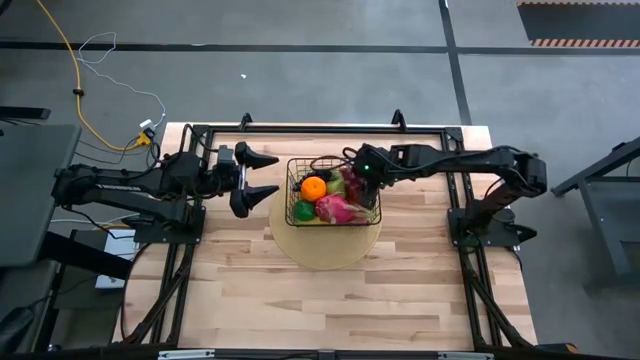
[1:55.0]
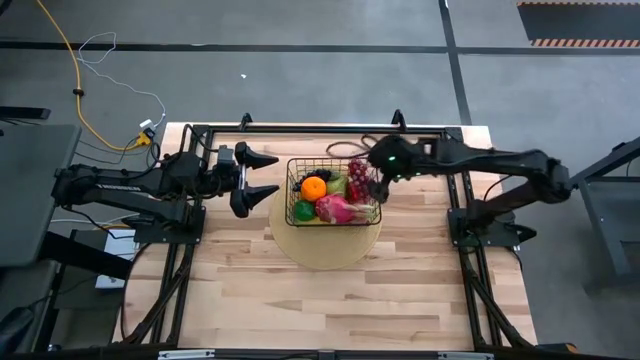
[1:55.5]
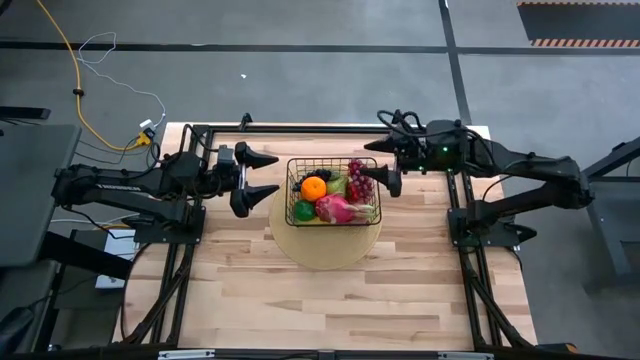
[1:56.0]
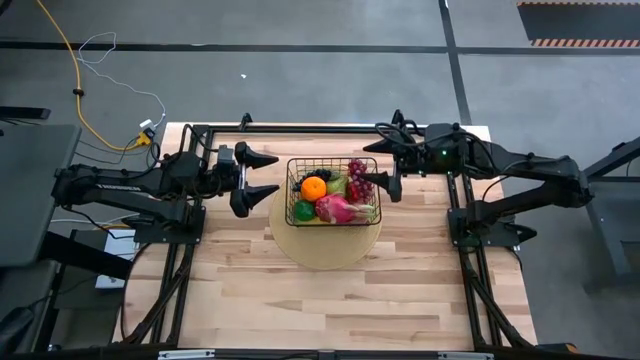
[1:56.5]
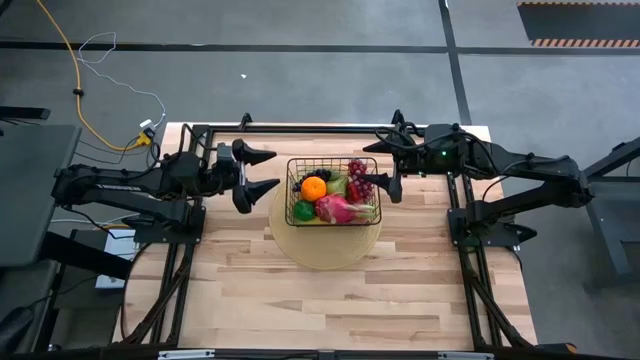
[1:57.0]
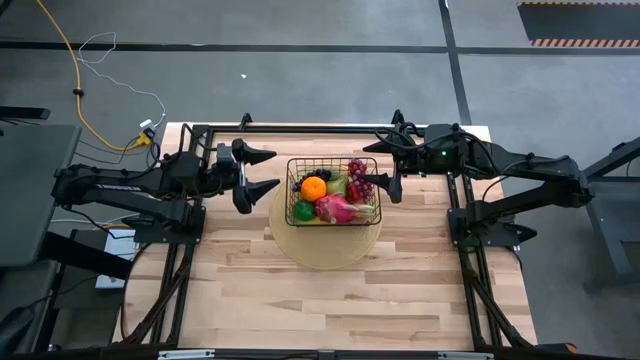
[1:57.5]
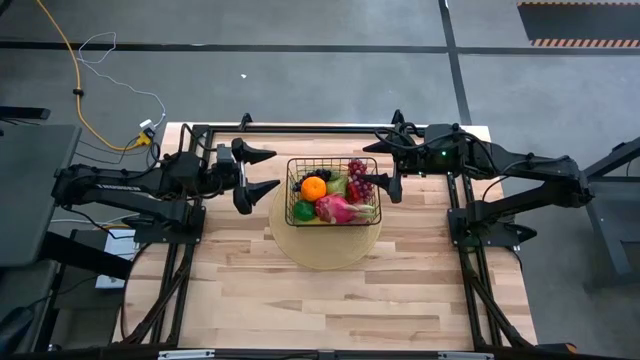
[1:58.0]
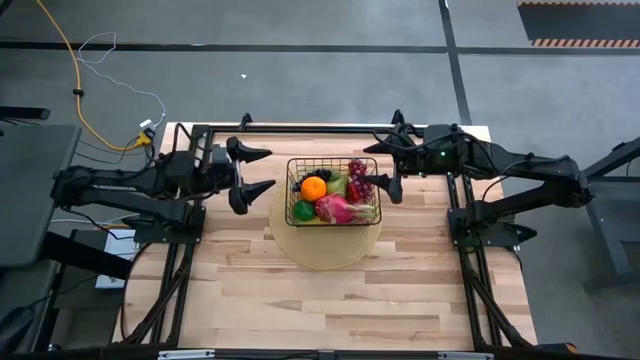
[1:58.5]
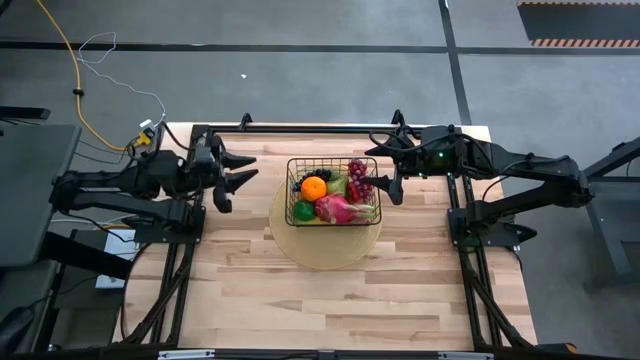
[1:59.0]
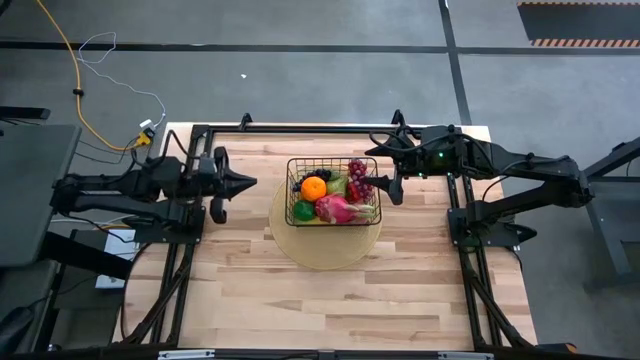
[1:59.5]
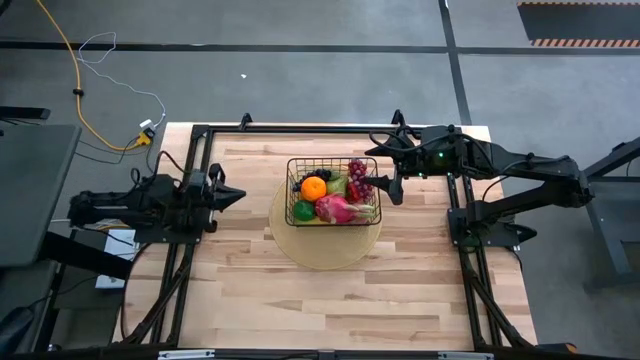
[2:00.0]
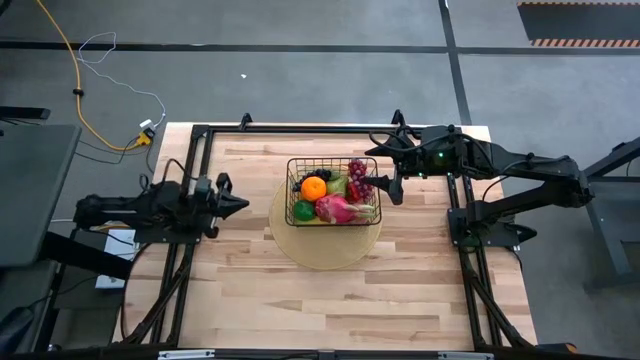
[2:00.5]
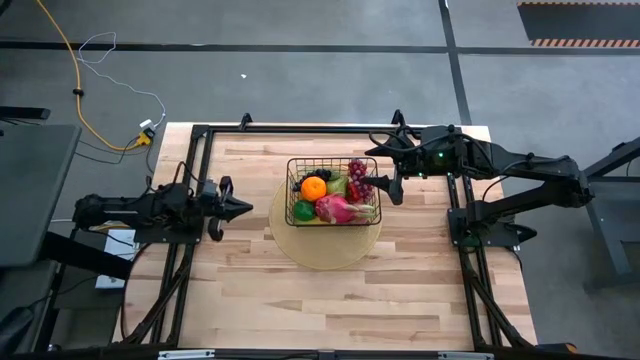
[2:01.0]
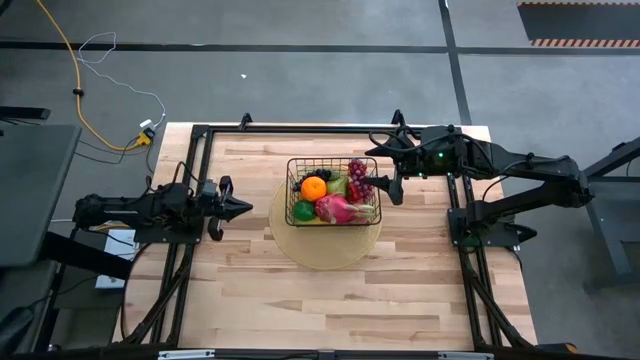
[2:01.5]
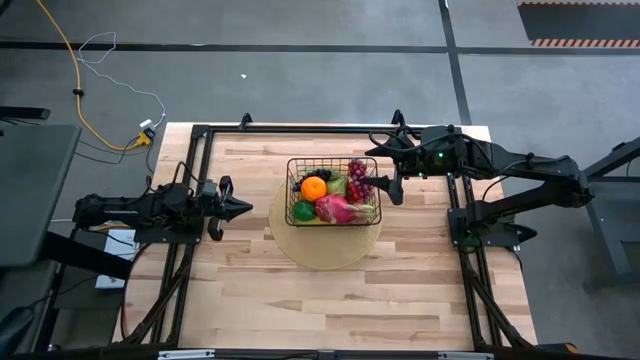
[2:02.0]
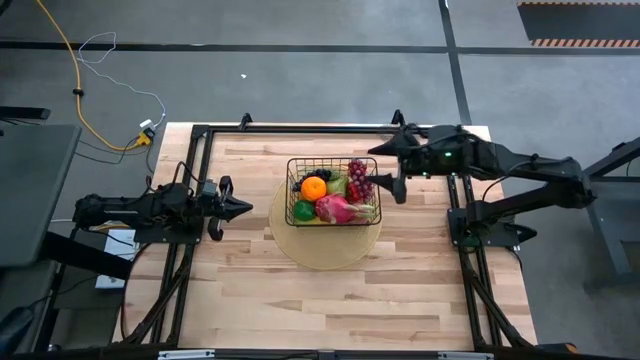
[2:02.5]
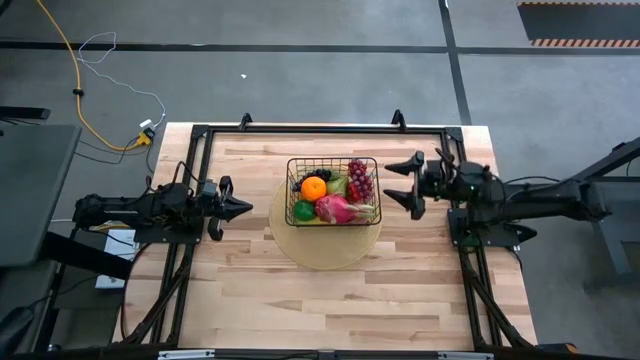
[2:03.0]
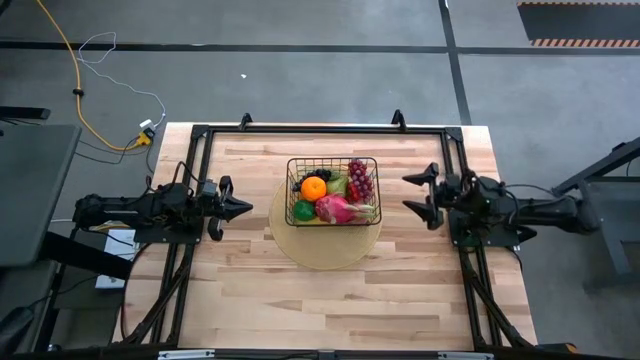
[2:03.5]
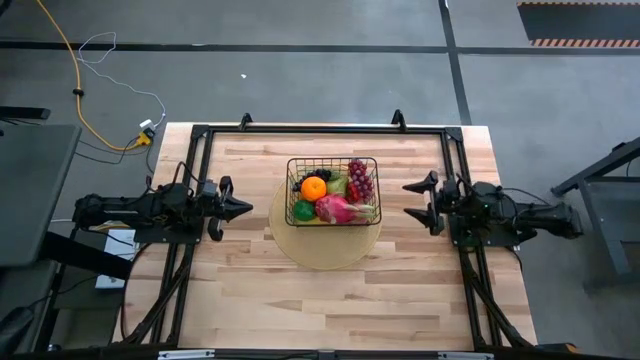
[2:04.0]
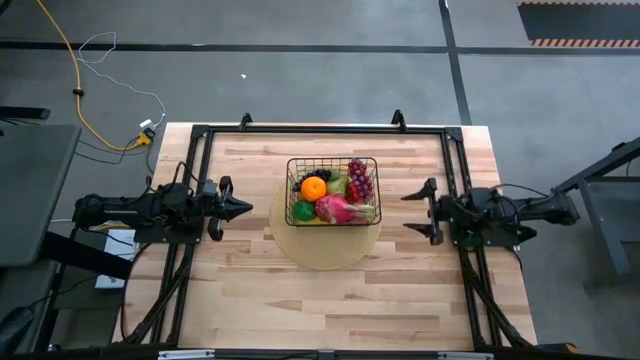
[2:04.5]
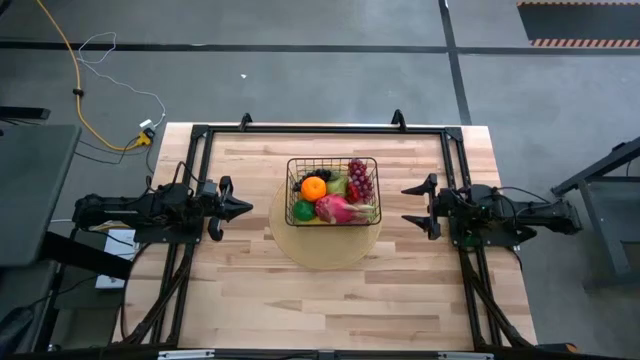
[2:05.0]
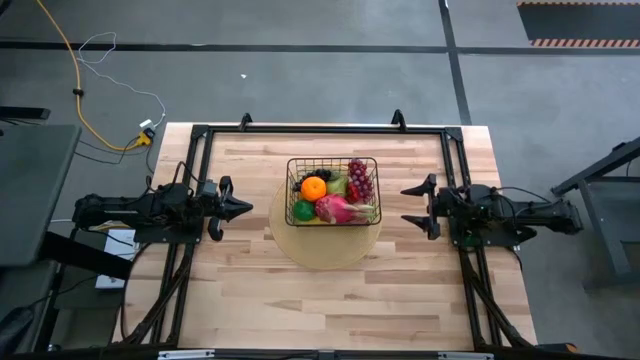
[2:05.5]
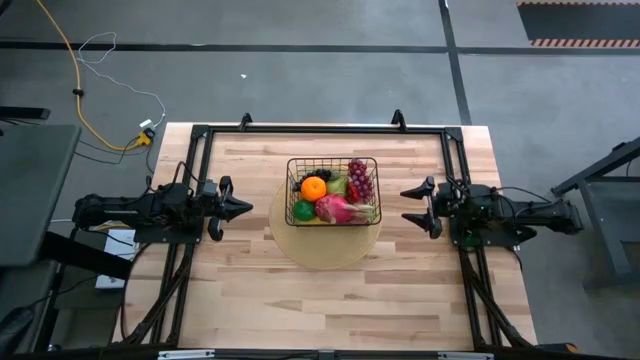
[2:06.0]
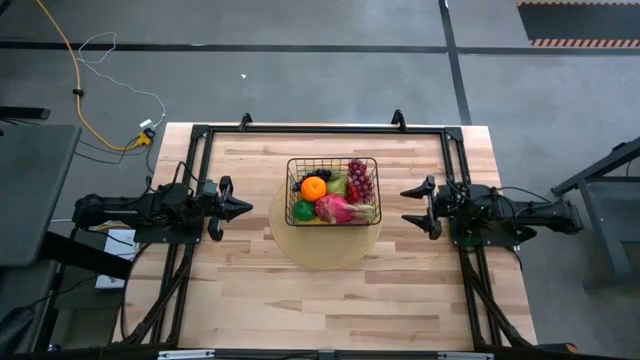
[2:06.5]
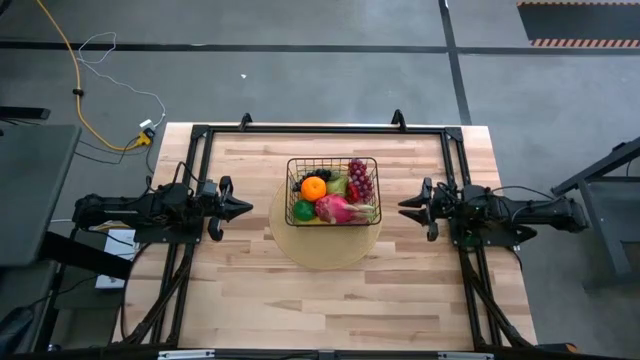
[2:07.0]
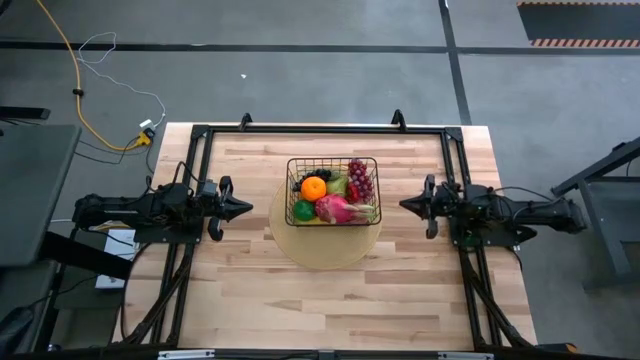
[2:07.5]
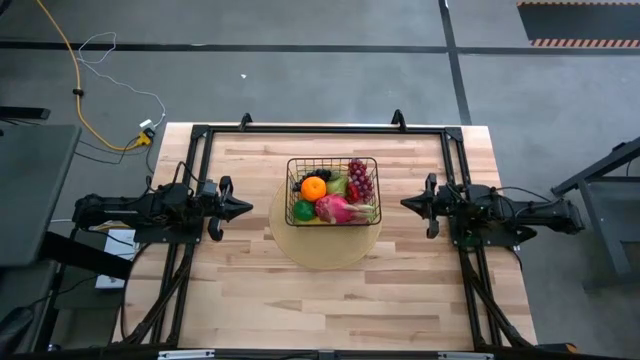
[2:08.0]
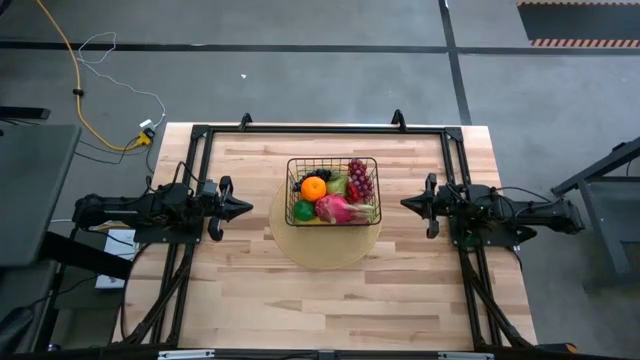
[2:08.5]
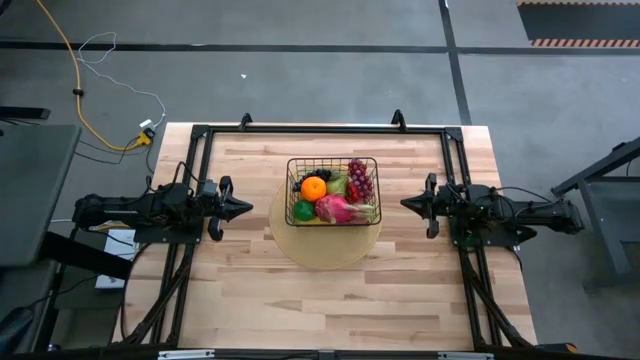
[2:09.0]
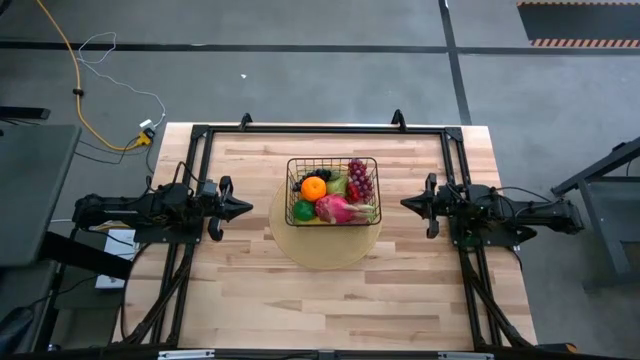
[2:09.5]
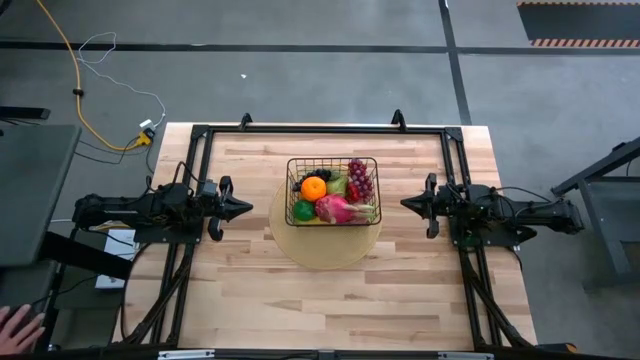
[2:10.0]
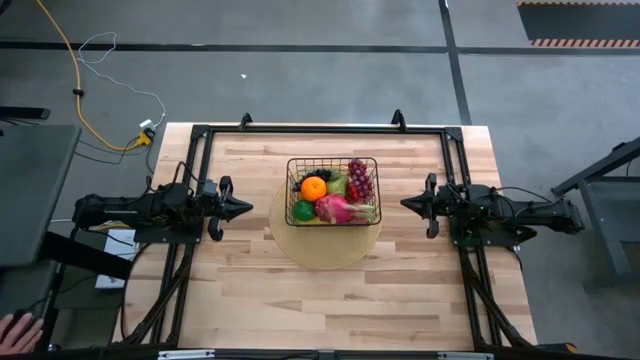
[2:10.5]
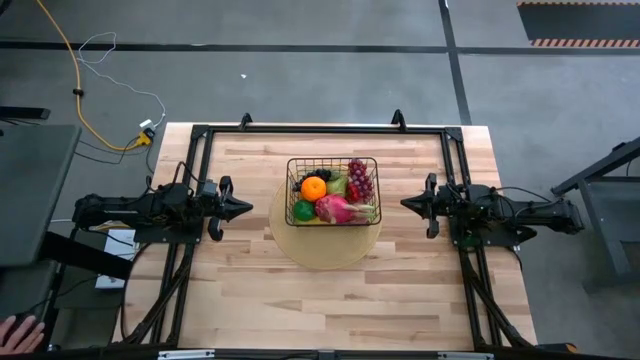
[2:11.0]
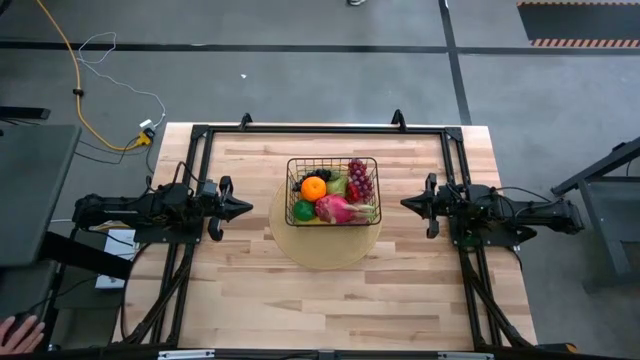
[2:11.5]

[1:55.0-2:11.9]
Task: Build produce basket
Return to Home Position

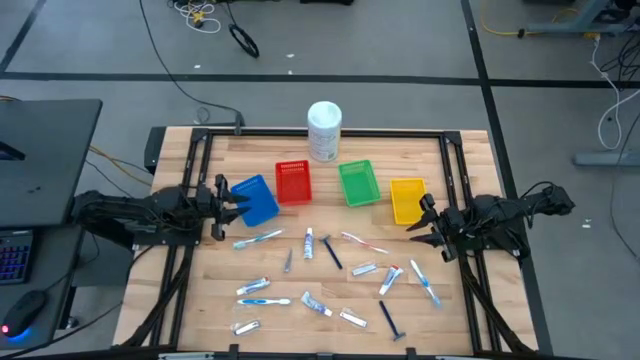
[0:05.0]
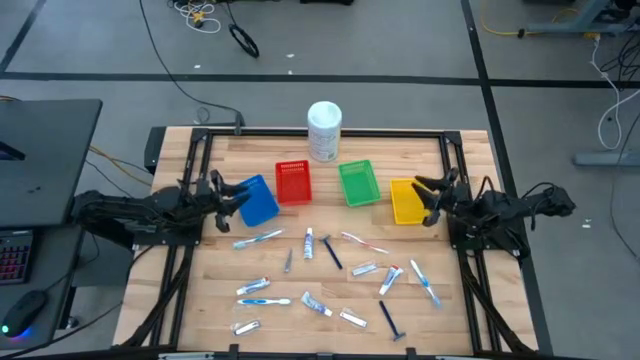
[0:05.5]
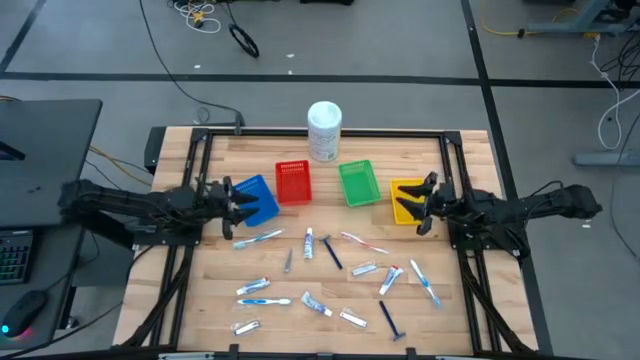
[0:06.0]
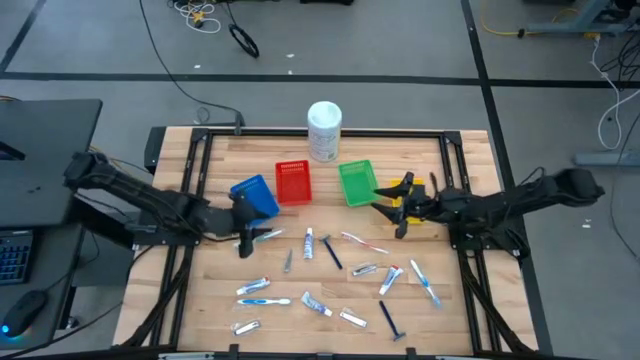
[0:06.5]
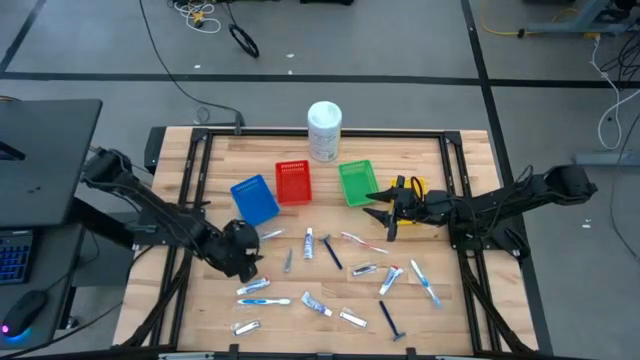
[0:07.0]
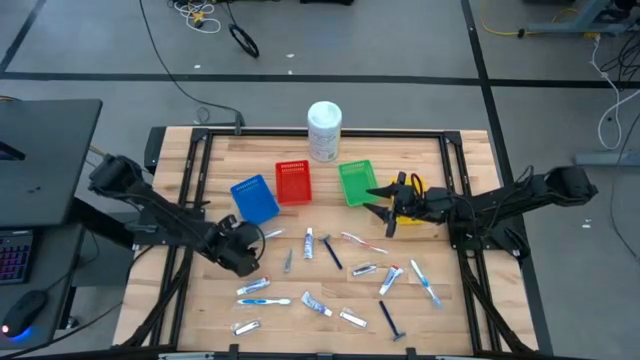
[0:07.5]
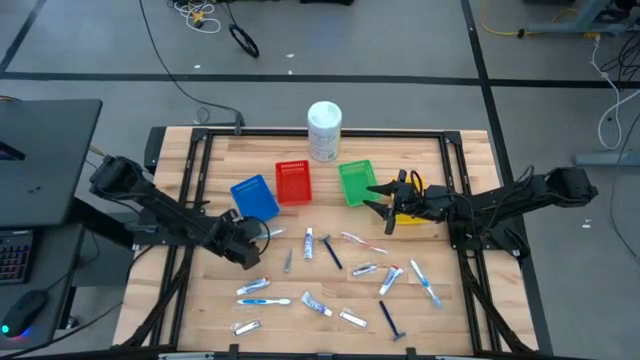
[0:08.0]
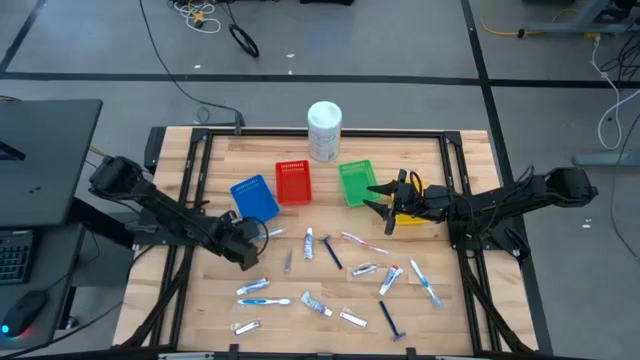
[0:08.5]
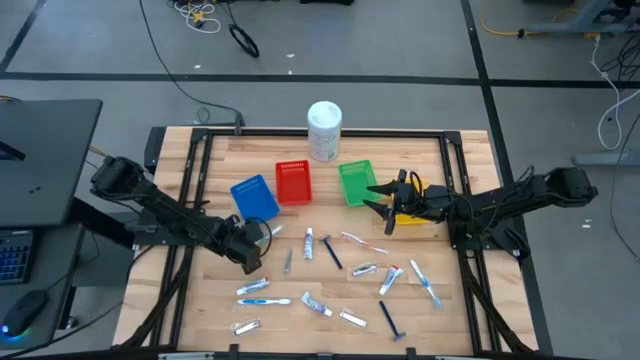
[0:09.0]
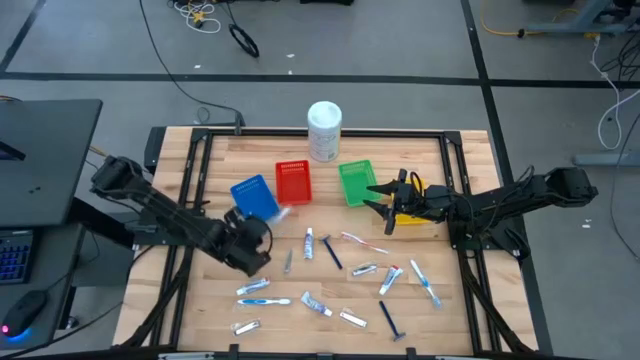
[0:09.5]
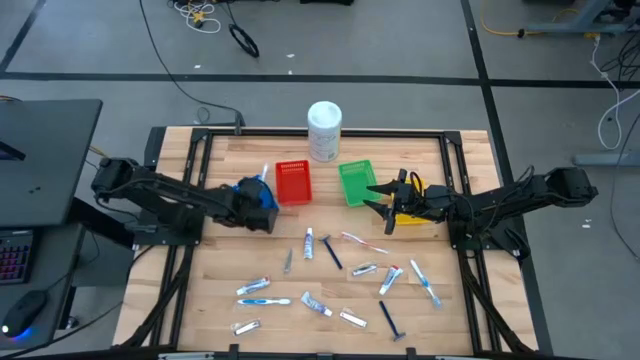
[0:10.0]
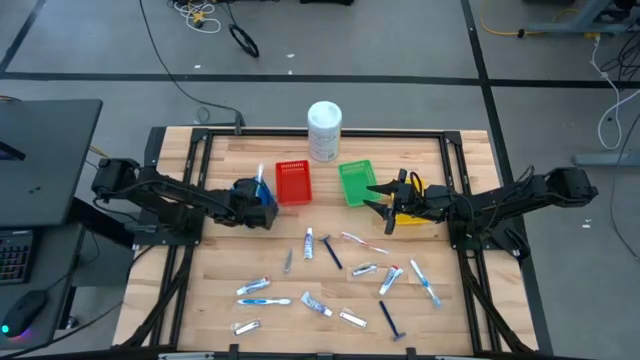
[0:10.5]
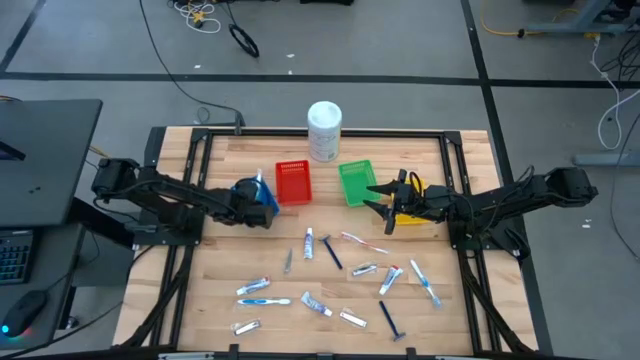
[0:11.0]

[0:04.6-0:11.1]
Task: Pick & Place Travel size toiletries
Put the green toothbrush into the blue bin
